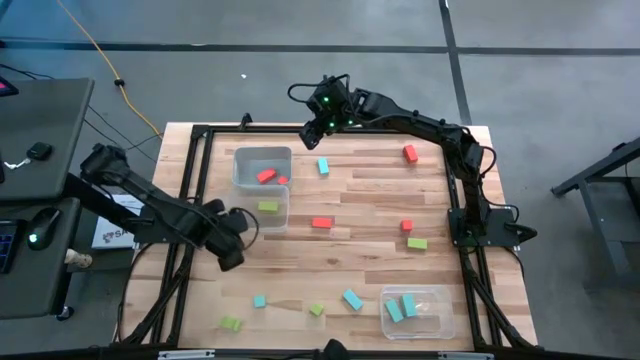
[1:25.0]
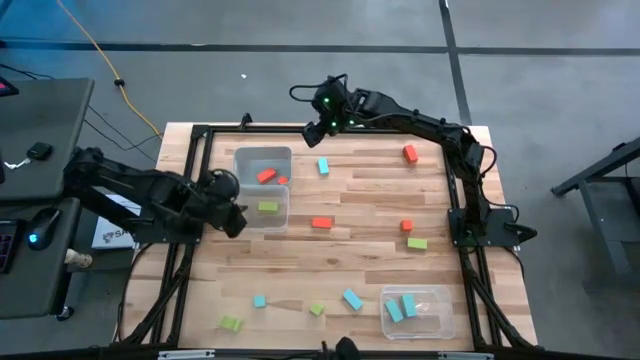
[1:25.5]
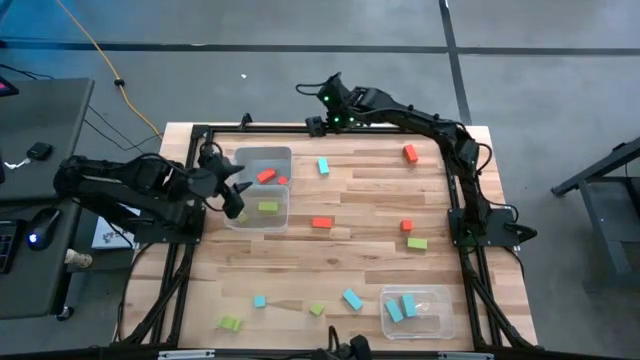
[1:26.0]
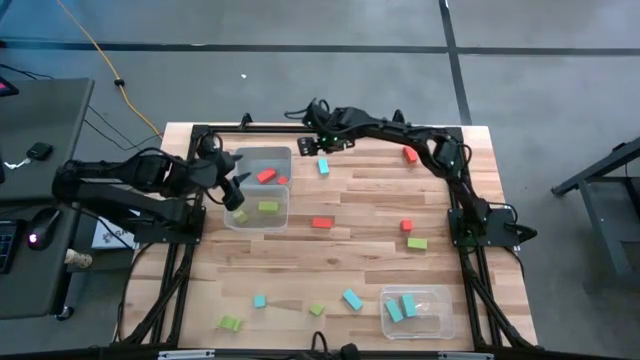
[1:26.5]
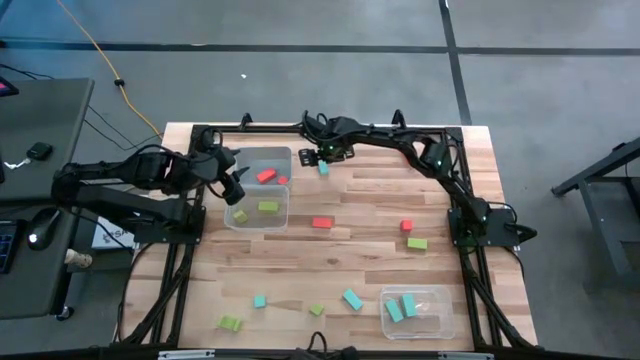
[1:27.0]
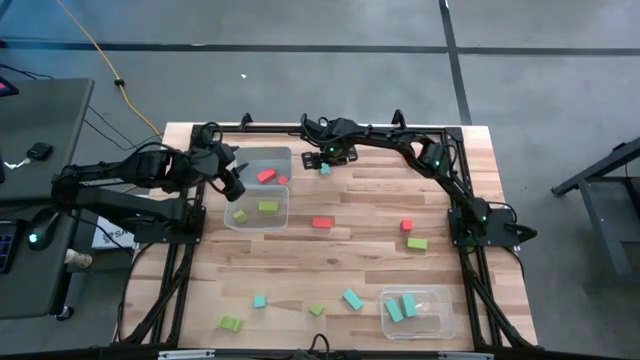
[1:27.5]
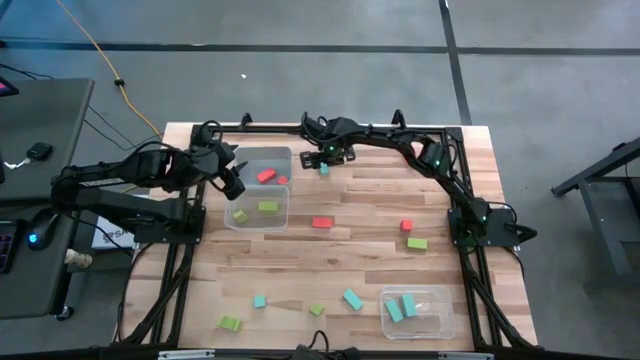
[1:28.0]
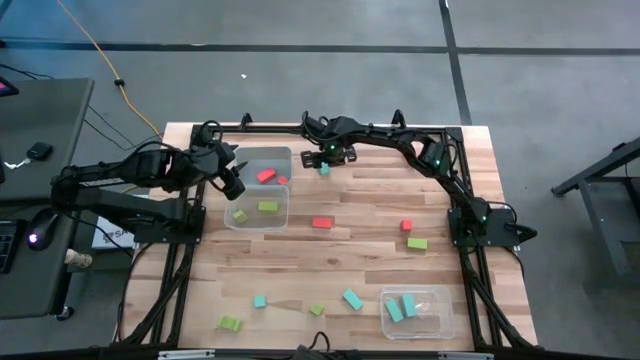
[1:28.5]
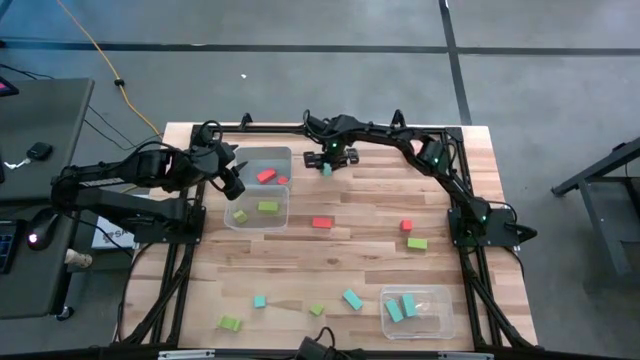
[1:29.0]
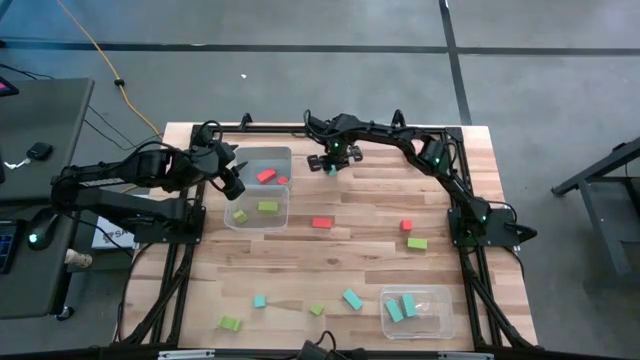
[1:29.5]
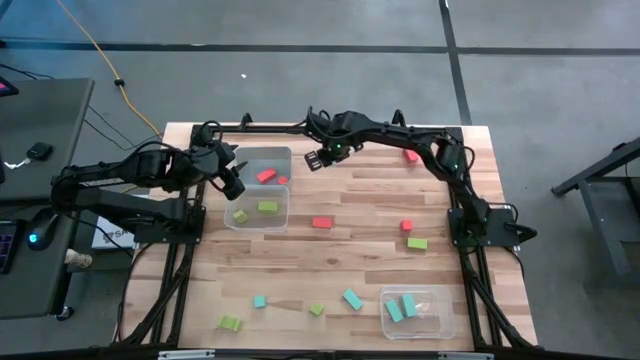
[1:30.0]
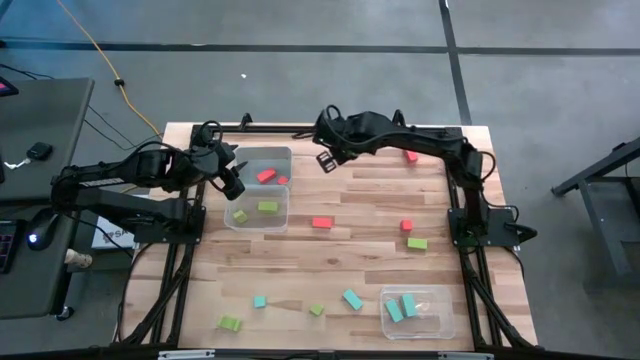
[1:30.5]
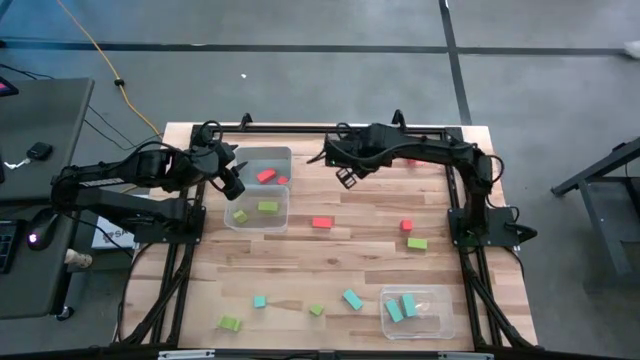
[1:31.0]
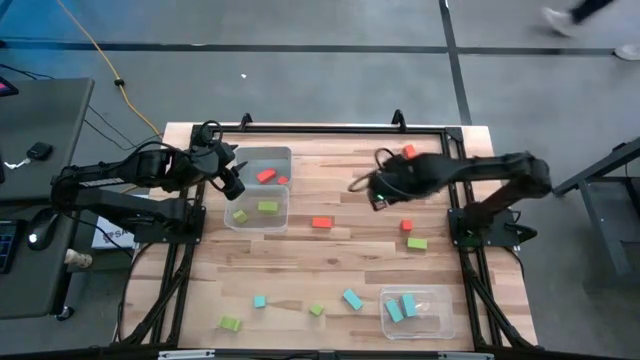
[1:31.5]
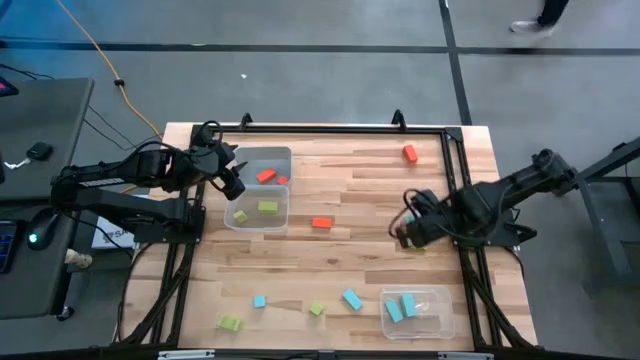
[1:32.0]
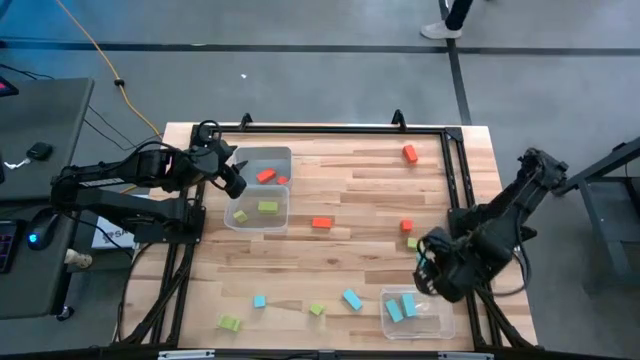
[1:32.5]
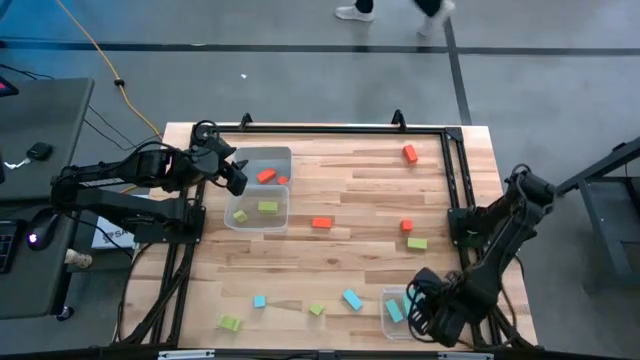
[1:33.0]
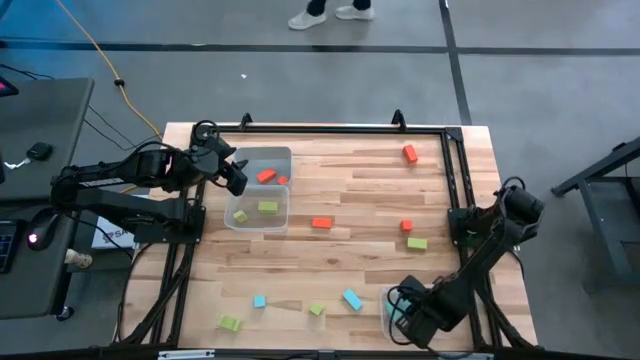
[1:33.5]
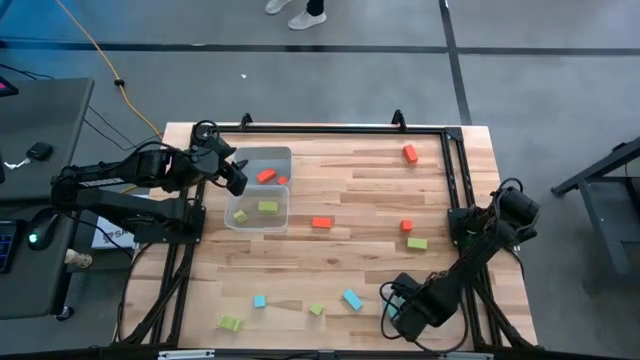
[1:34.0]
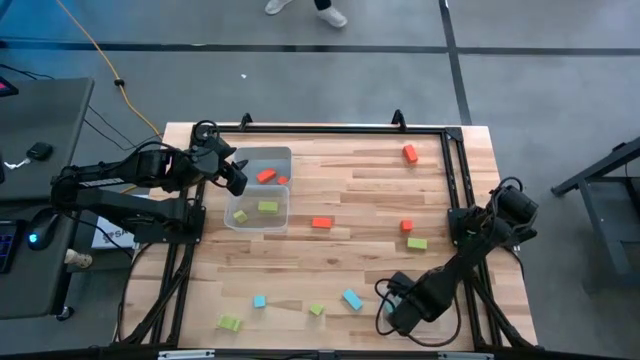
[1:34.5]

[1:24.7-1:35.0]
Task: Sort & place blocks by color
Put the blue block into the bottom transparent bin

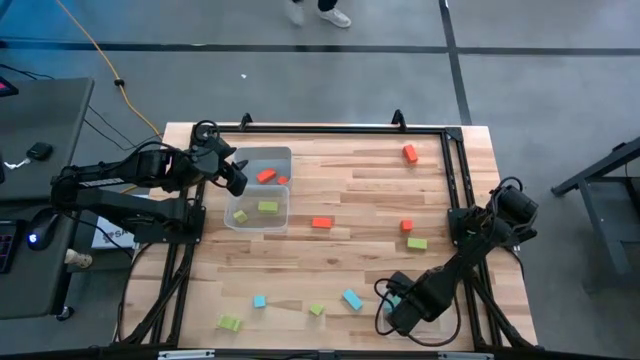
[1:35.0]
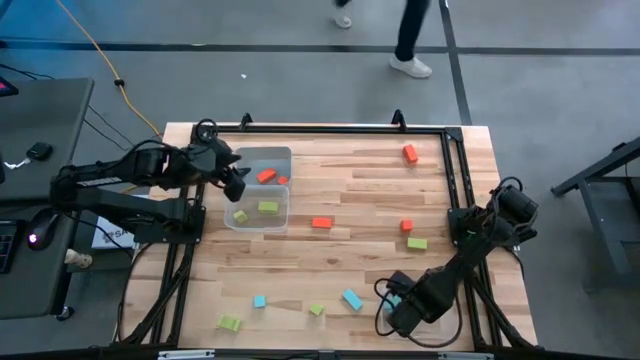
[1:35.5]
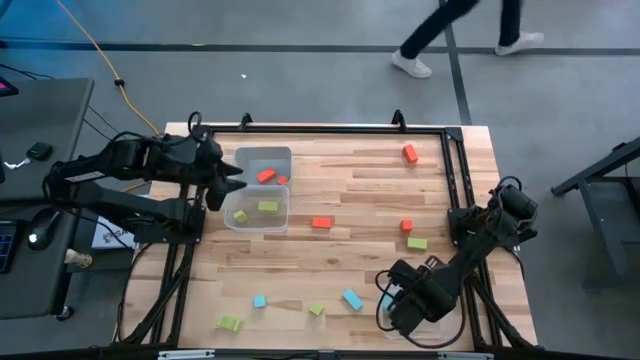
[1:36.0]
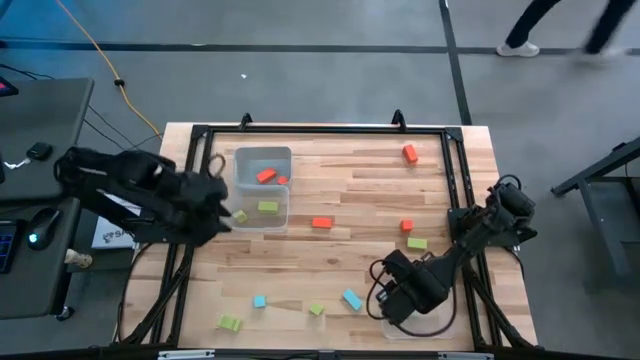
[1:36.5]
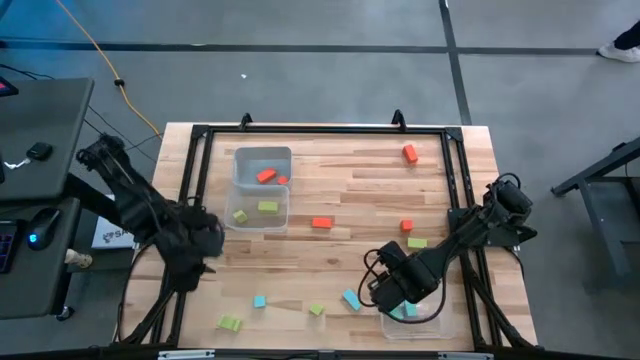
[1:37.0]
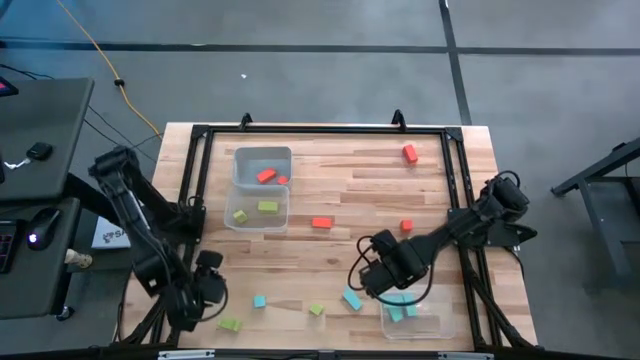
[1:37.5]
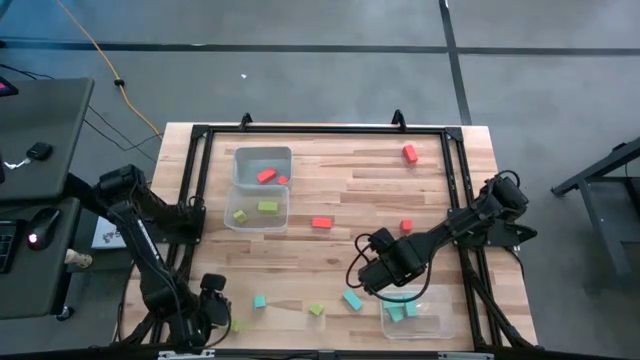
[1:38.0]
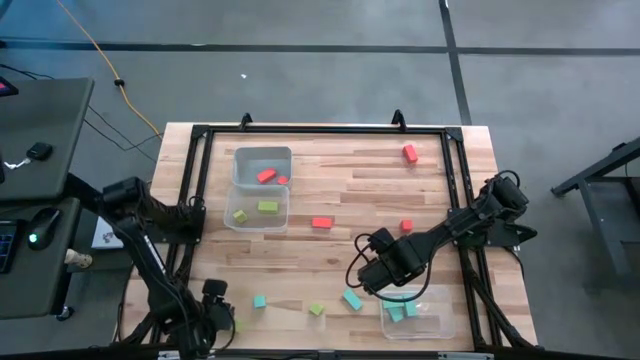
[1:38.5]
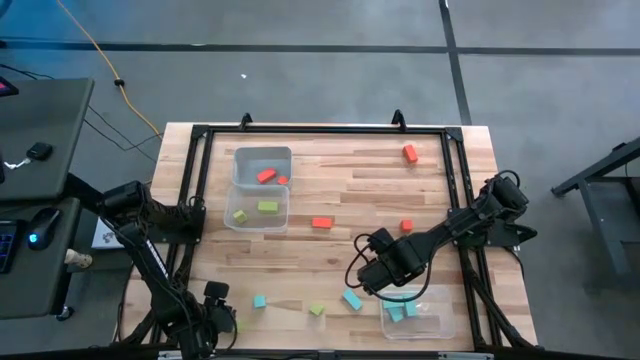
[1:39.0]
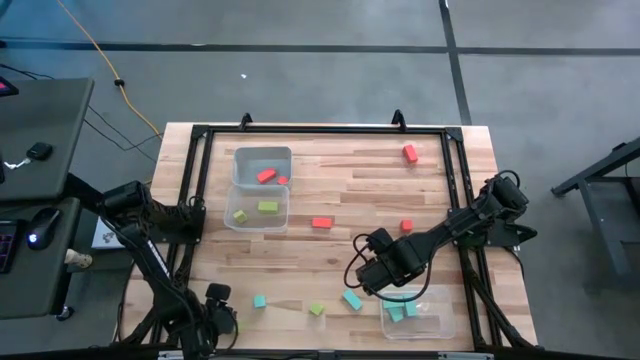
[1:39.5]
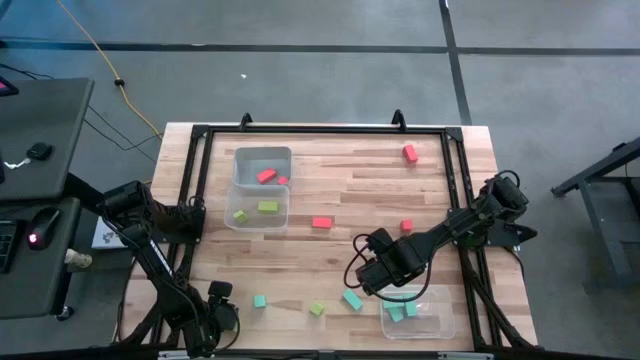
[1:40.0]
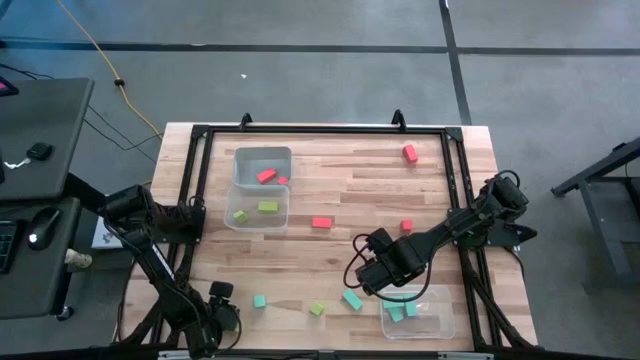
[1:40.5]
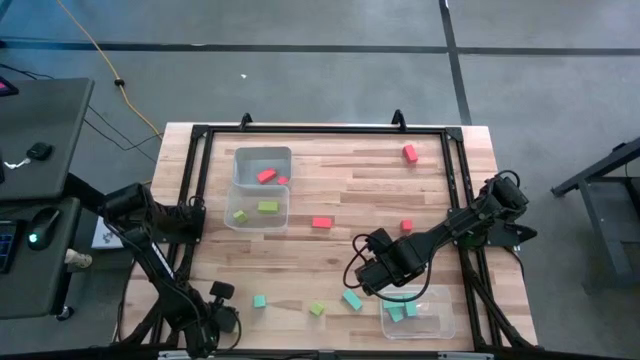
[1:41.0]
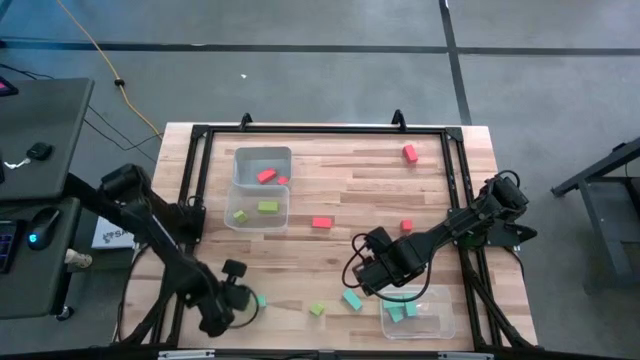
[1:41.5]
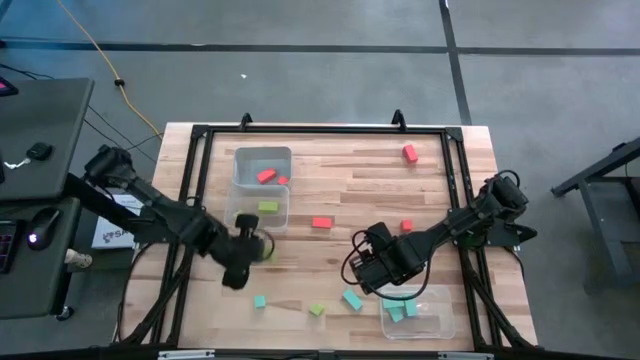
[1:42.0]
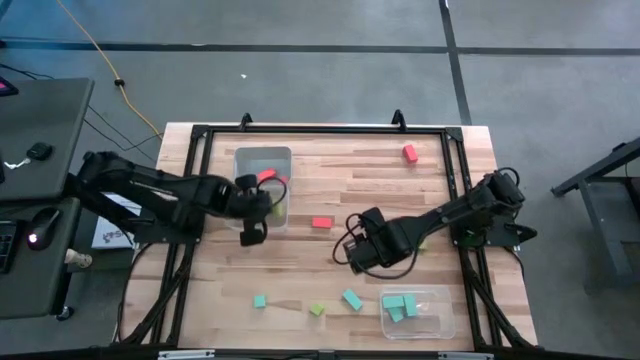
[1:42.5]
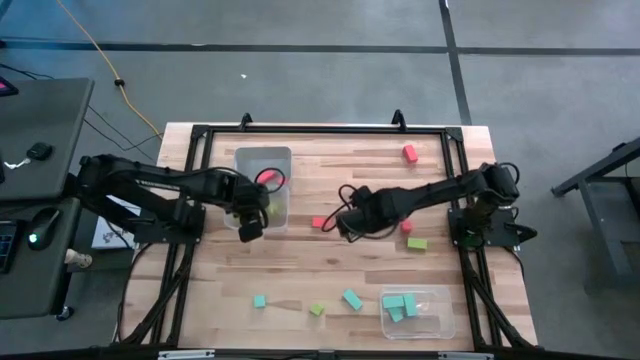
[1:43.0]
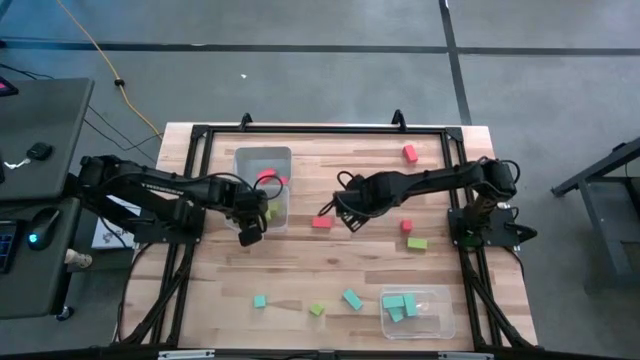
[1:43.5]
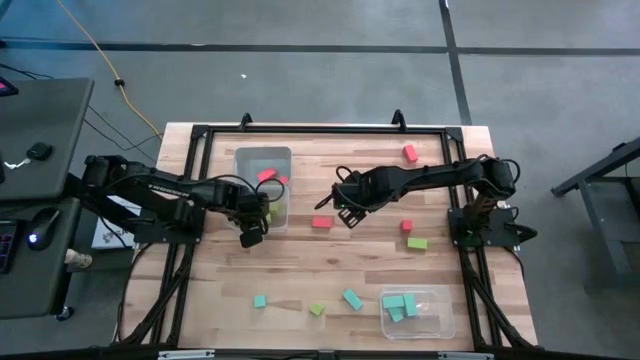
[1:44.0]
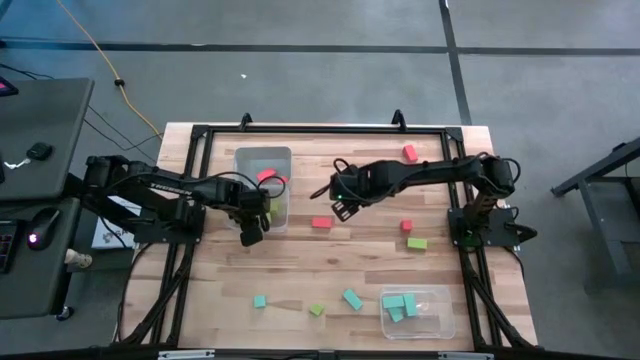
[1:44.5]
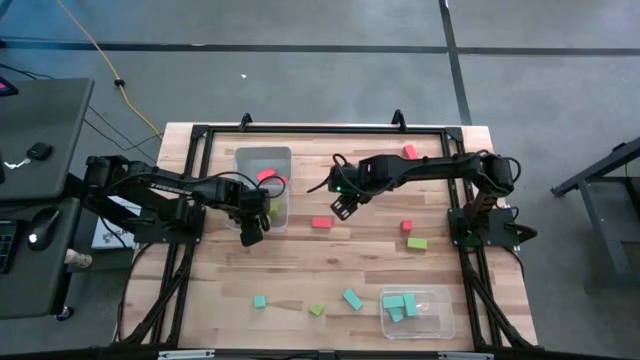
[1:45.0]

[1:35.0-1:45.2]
Put the green block into the top transparent bin
